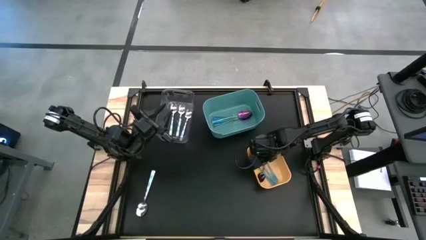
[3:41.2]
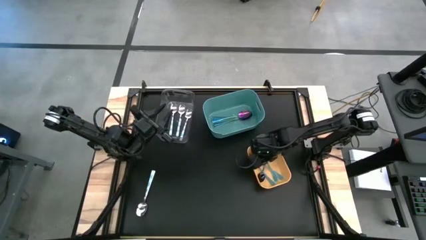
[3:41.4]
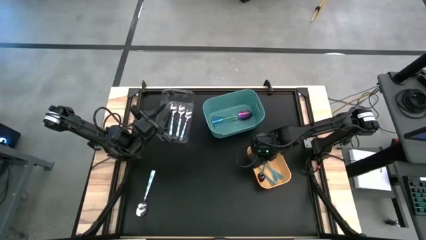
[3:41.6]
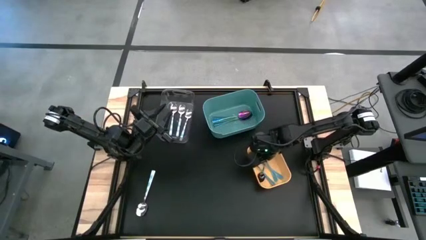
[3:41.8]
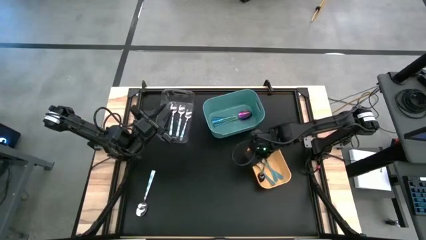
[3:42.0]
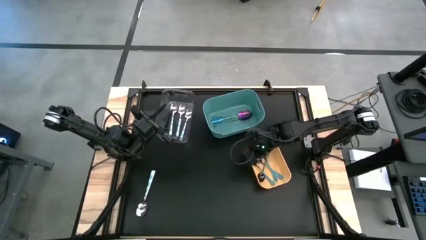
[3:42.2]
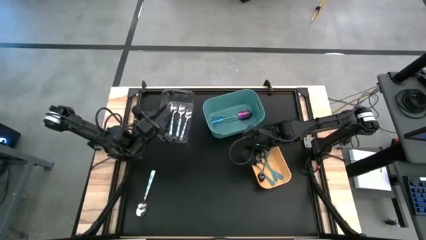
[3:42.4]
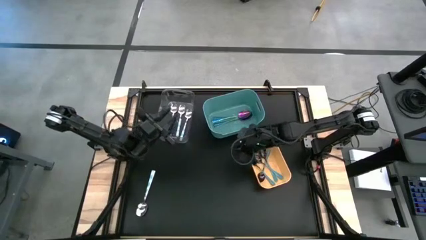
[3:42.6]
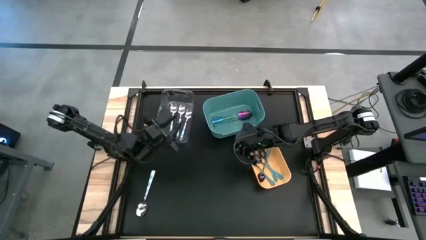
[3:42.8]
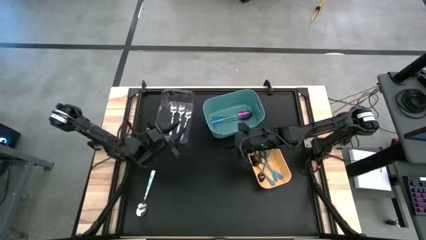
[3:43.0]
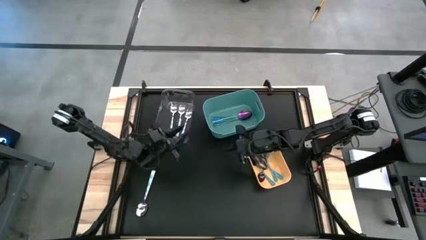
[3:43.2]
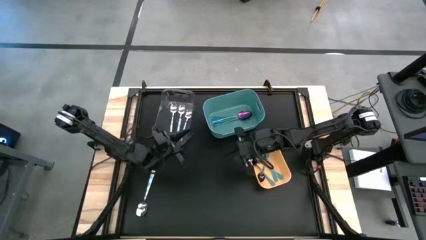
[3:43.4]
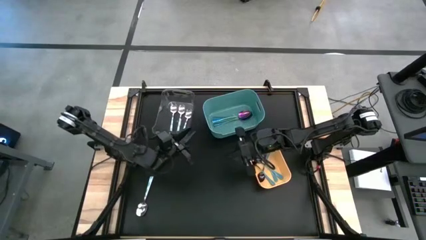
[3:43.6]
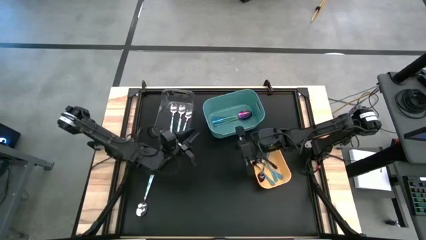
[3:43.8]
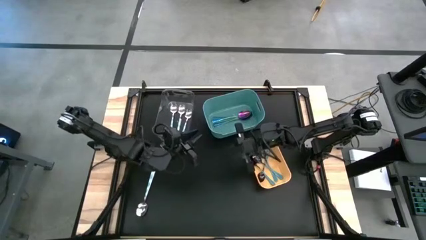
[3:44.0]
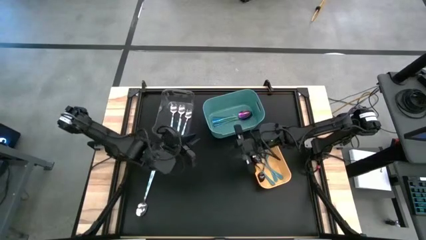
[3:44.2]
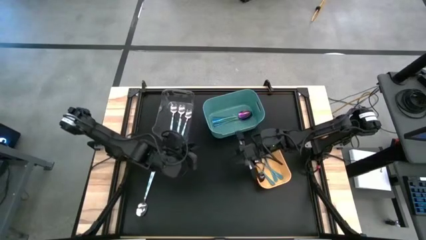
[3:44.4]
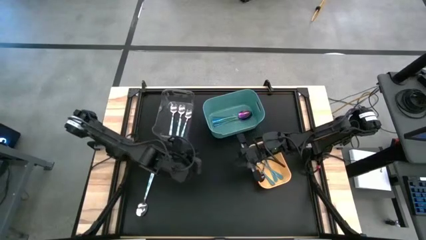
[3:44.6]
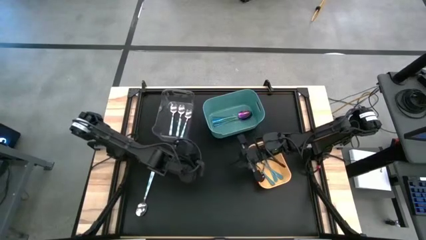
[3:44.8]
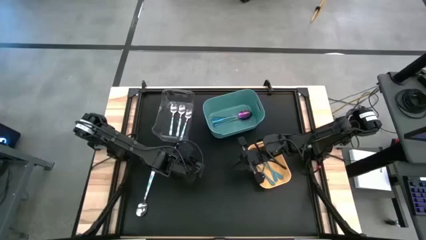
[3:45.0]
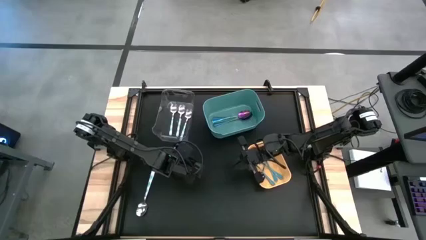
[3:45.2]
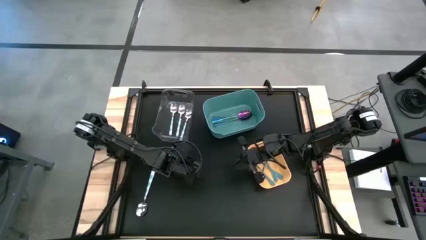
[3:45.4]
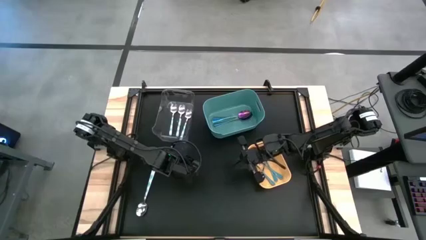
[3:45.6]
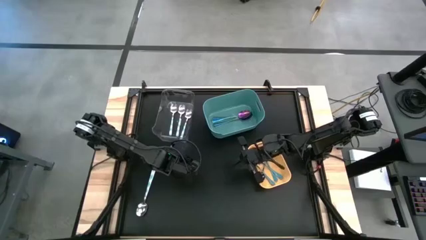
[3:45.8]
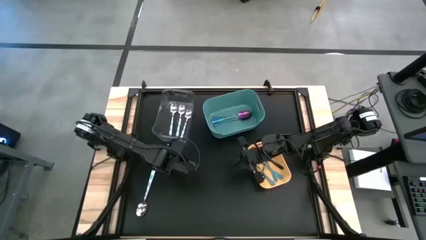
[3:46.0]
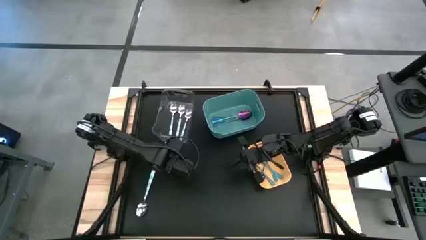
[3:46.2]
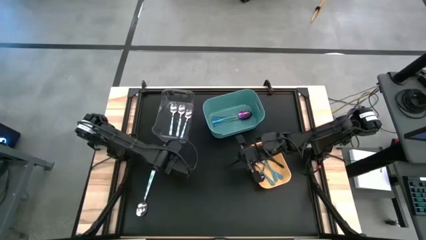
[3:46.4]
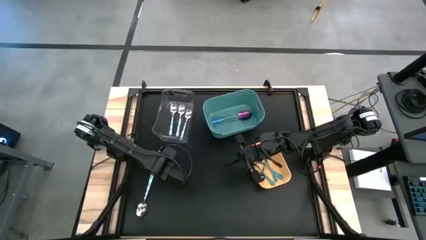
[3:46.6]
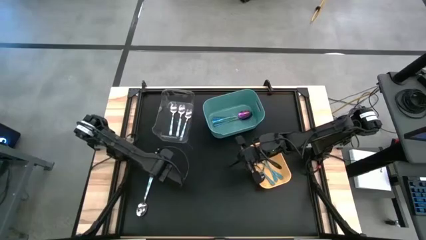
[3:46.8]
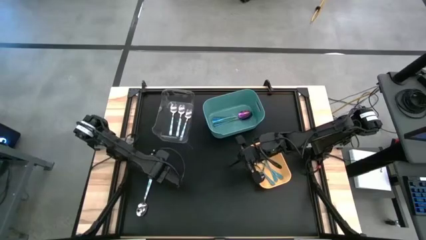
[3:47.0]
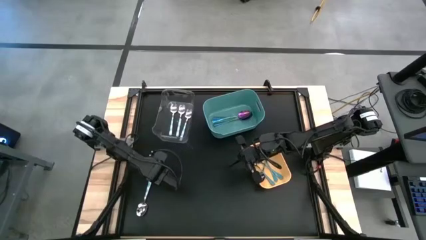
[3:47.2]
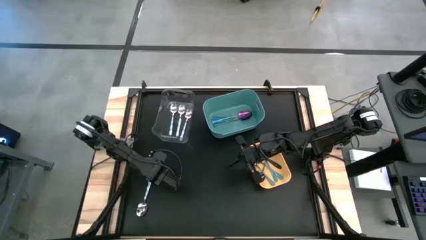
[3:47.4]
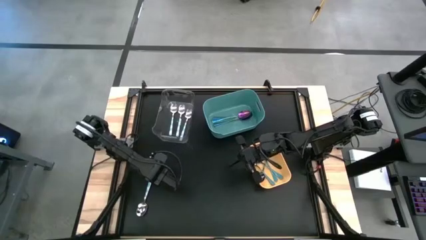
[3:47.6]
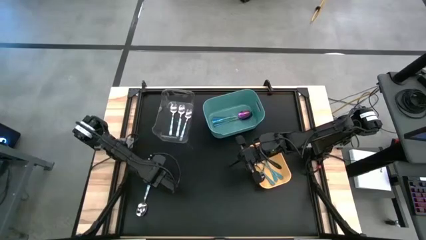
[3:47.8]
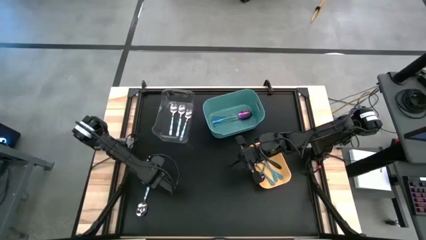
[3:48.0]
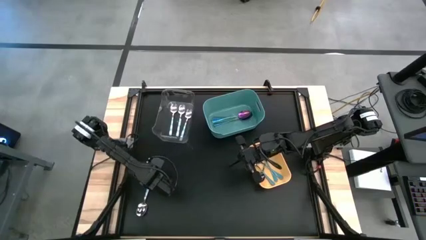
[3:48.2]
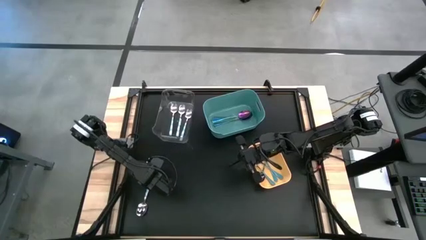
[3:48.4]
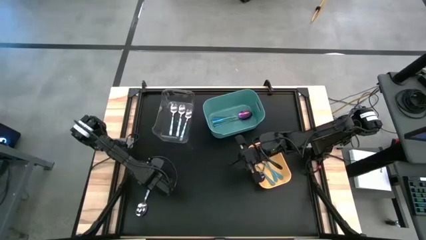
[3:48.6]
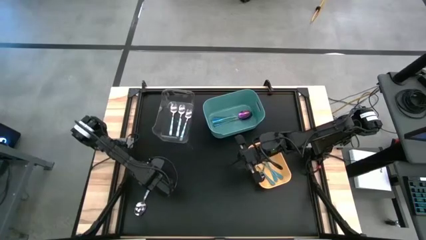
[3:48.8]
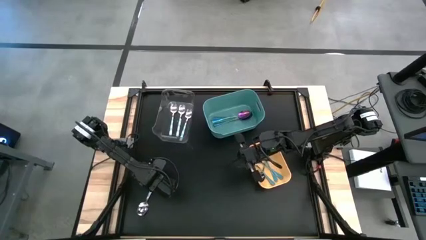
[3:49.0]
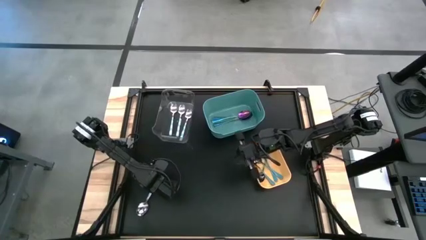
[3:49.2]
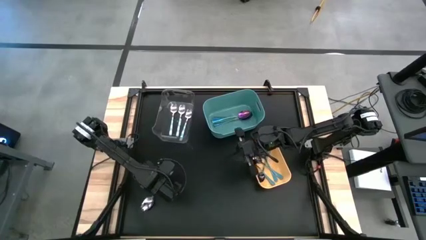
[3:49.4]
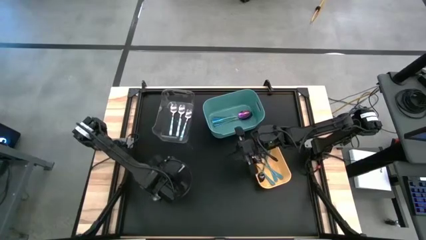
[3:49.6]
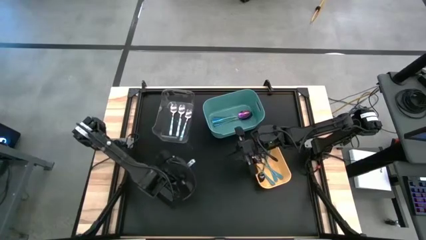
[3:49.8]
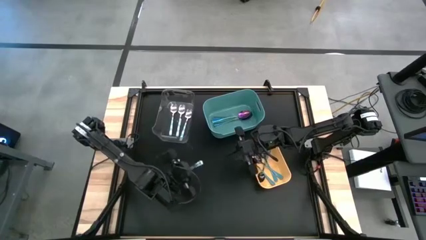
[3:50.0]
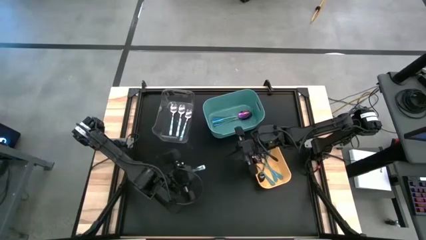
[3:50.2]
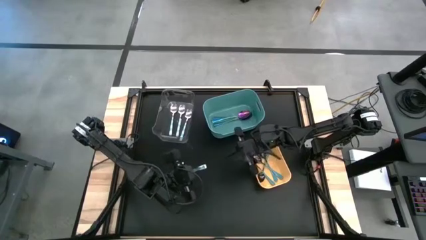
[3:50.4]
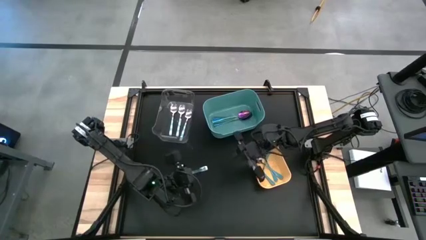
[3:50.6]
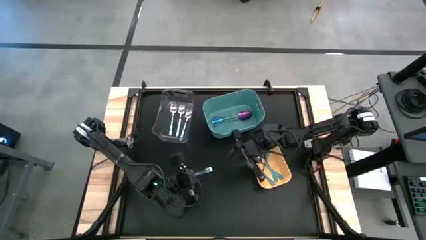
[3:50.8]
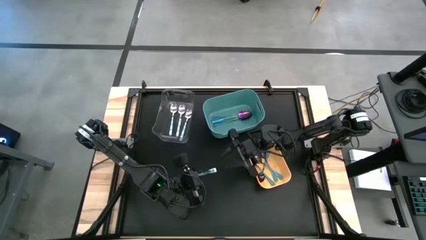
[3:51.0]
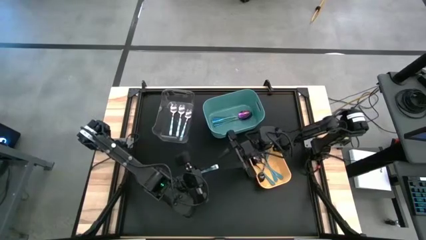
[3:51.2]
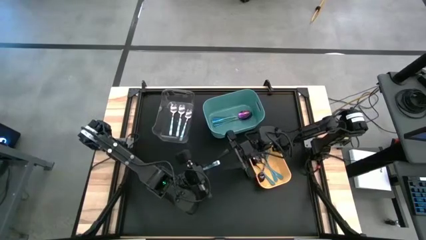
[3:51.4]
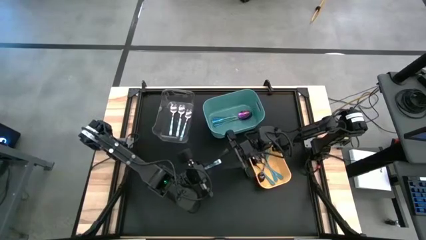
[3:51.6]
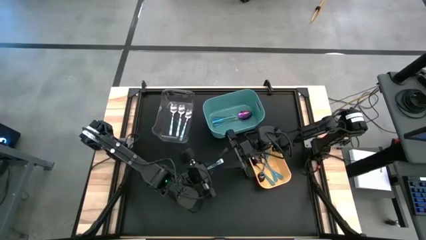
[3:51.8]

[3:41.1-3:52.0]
Task: Sort silverware by color (type)
Put the patterned blue spoon into the transparent bin

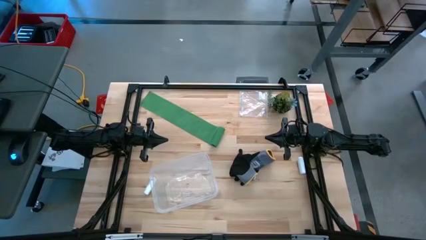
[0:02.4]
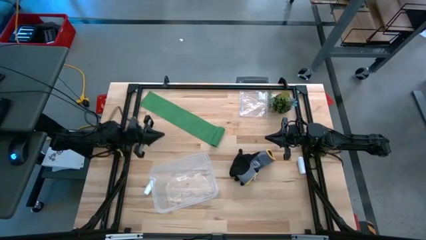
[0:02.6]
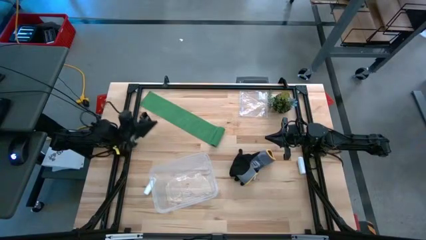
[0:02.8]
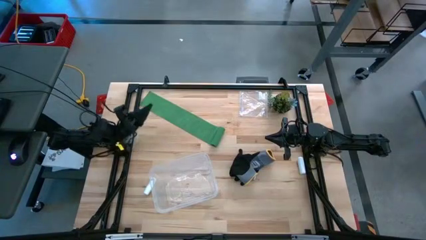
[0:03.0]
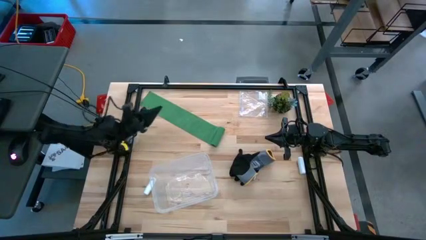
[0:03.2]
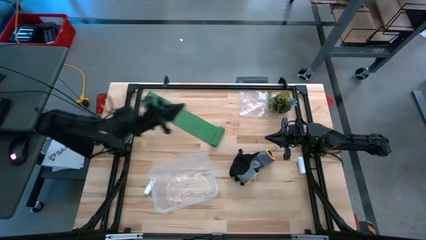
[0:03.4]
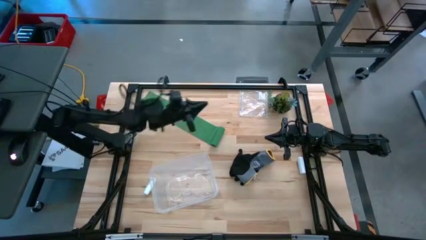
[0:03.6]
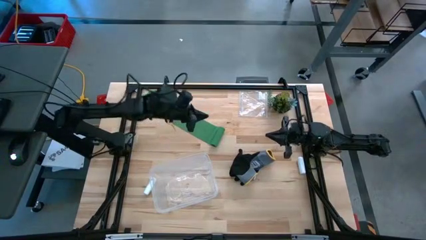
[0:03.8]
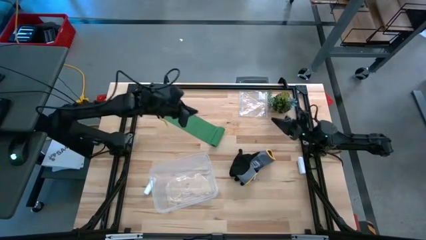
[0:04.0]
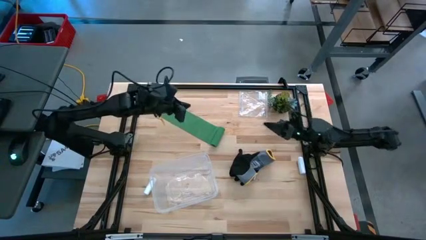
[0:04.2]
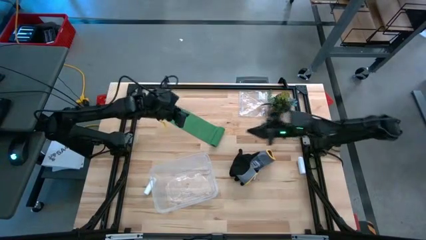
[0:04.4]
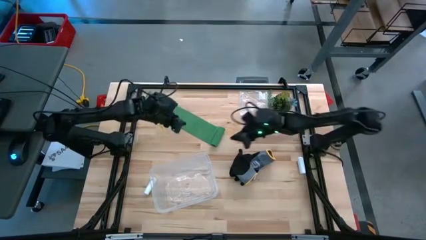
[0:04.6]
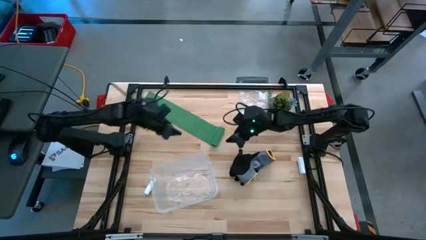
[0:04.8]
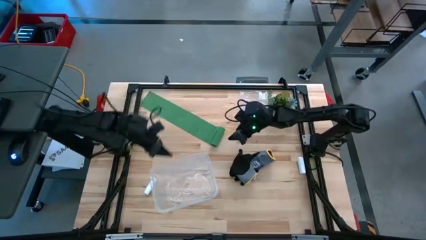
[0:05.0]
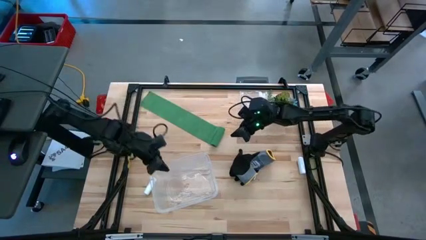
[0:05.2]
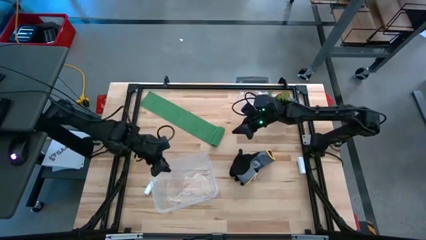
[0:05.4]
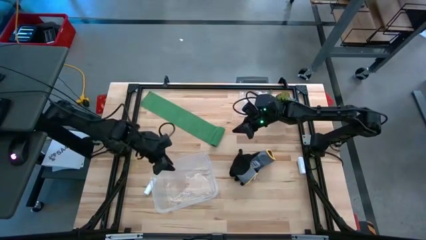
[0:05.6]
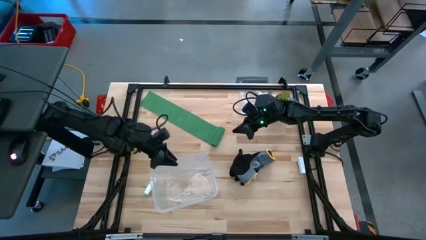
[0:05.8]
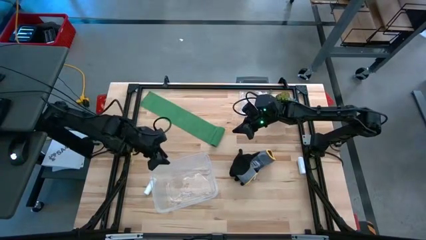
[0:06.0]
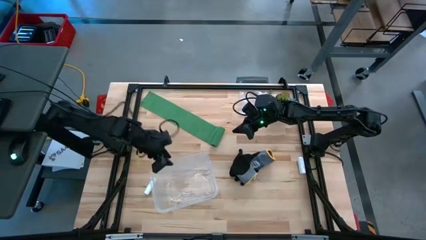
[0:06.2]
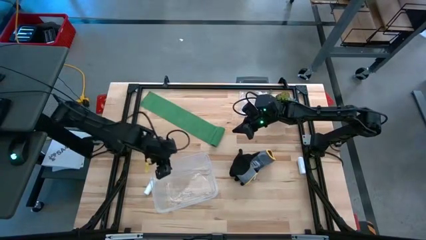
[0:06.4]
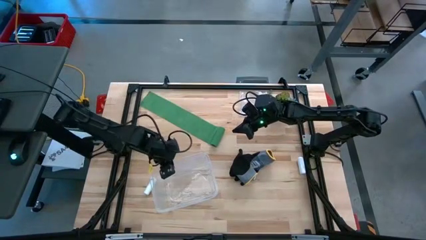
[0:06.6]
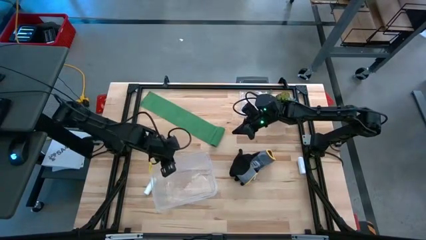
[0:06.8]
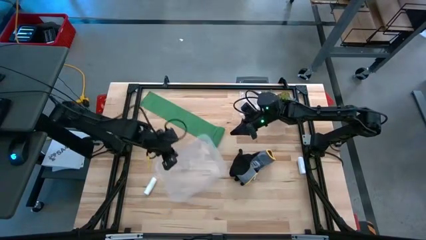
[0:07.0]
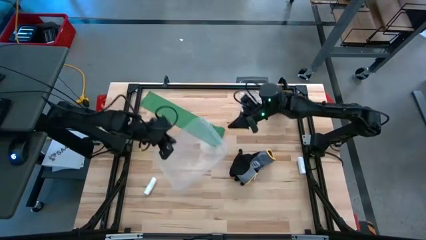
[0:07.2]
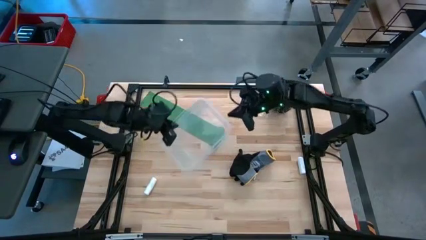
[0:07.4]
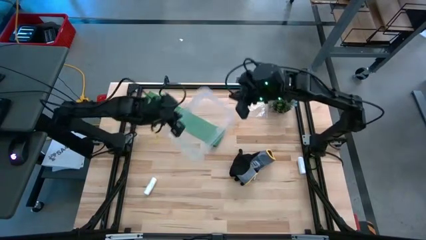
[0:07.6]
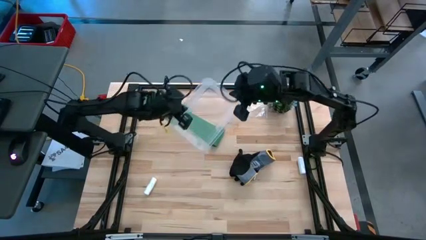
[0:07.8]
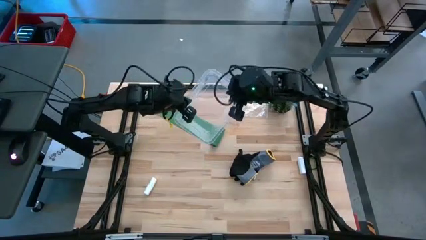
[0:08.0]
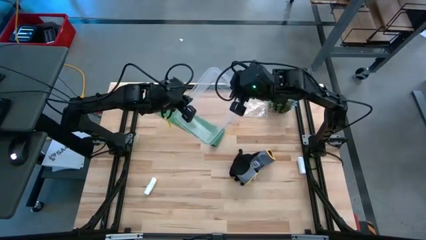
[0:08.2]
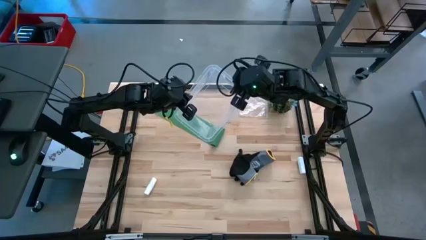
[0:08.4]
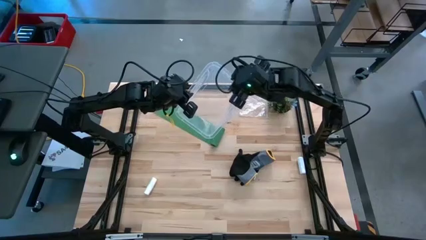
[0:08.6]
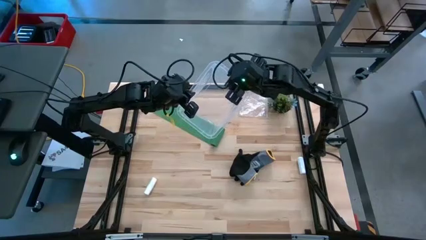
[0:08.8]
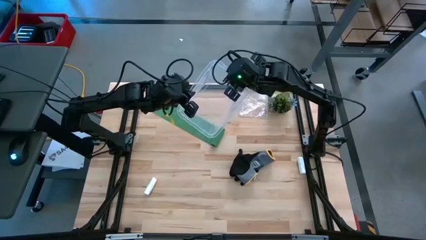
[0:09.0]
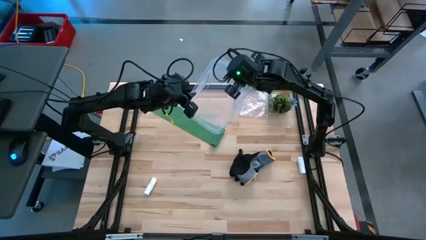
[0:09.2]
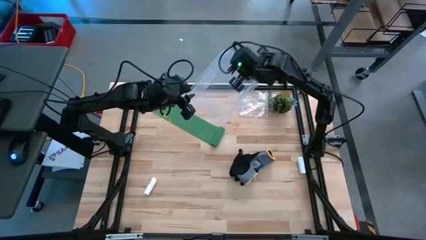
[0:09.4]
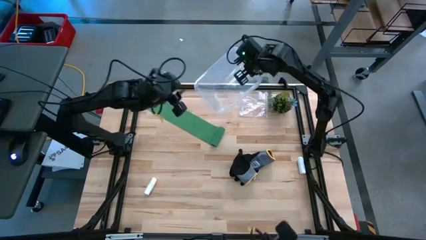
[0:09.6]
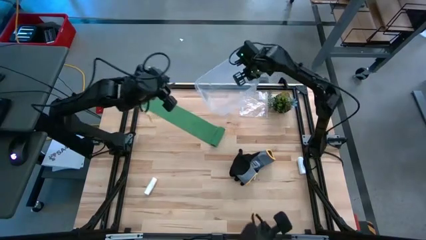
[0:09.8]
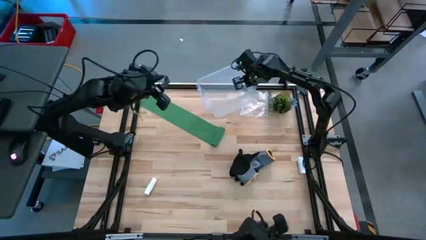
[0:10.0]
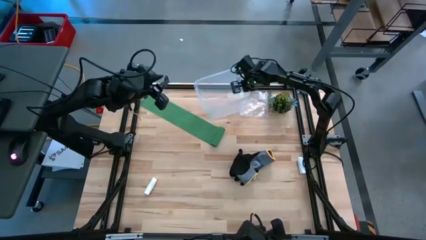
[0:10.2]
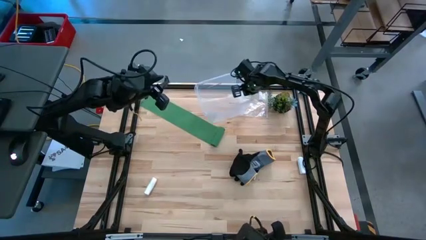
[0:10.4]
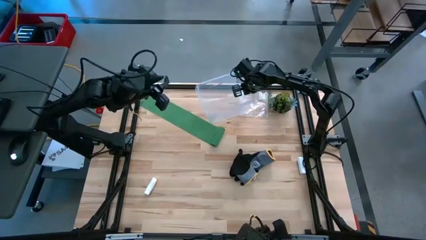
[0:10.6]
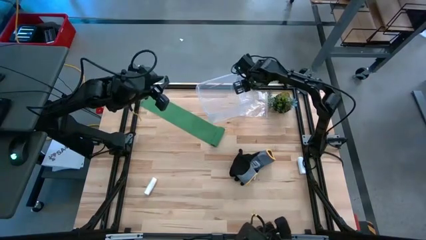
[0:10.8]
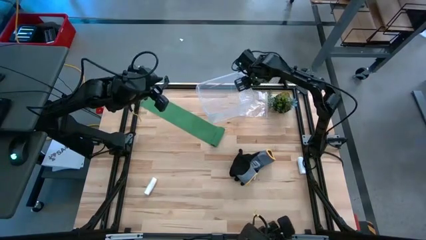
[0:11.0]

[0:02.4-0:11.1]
Task: Roll bandage
Move the transparent bin to the top middle of the table
